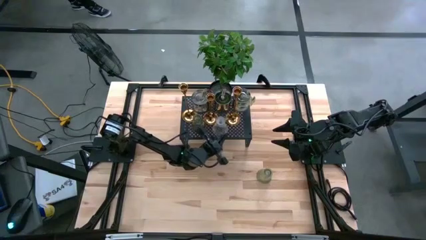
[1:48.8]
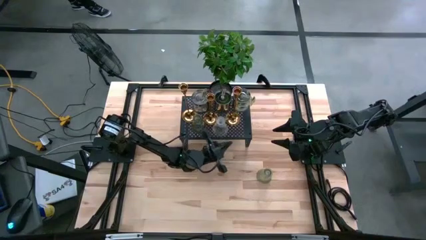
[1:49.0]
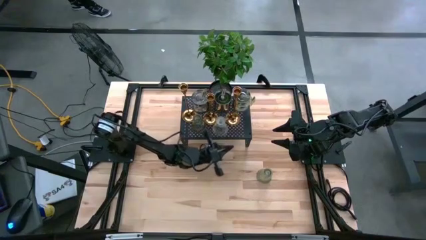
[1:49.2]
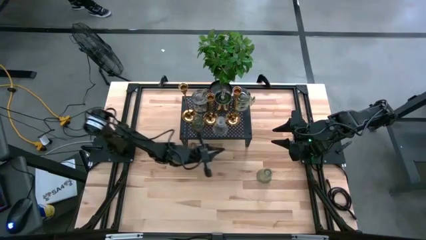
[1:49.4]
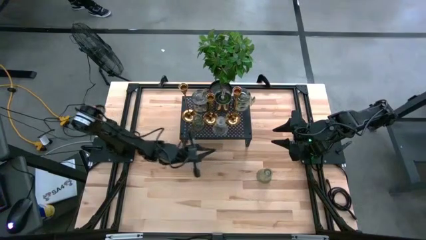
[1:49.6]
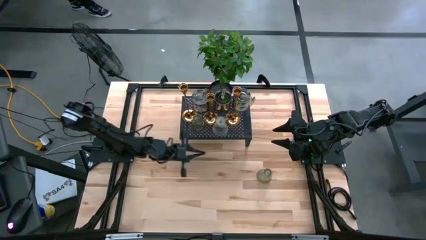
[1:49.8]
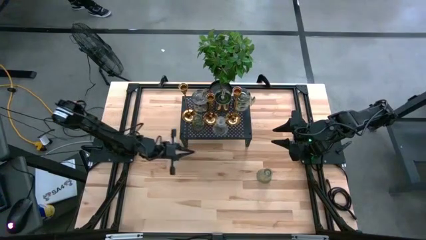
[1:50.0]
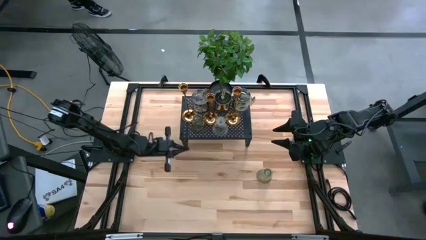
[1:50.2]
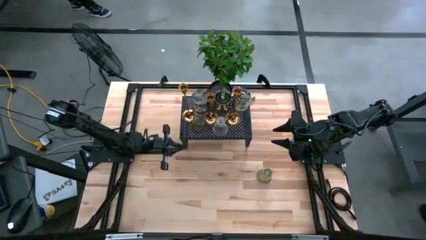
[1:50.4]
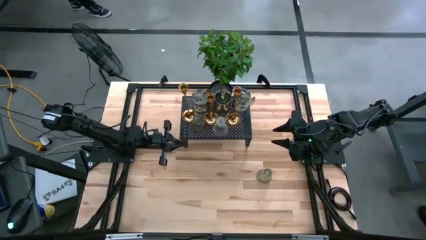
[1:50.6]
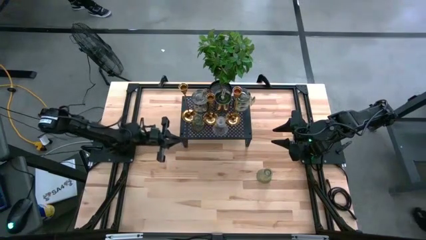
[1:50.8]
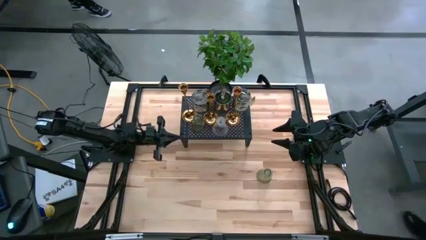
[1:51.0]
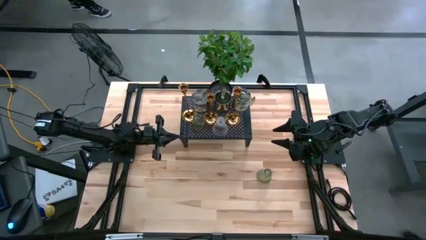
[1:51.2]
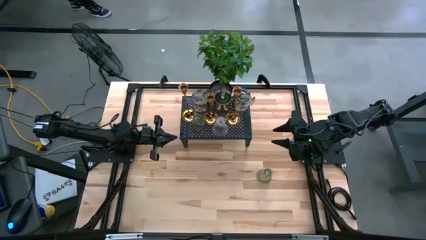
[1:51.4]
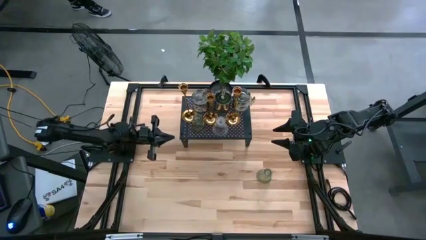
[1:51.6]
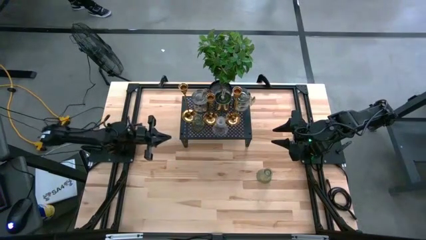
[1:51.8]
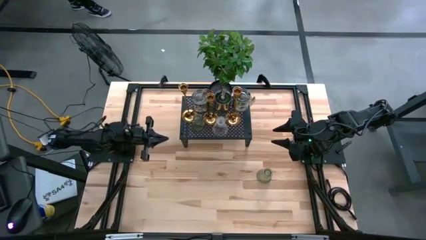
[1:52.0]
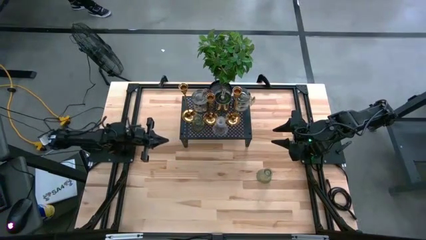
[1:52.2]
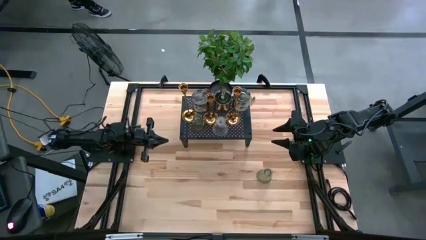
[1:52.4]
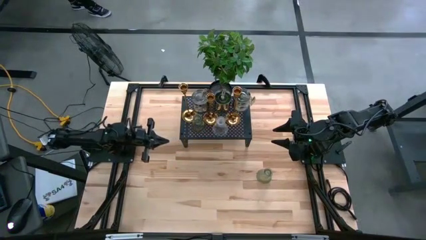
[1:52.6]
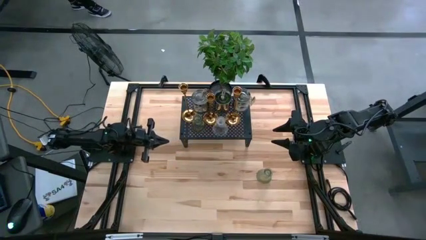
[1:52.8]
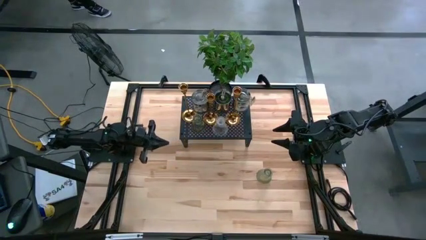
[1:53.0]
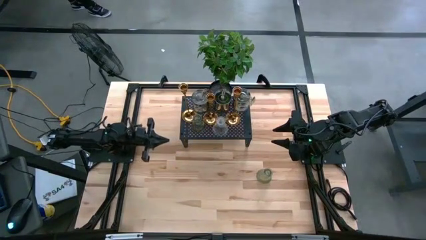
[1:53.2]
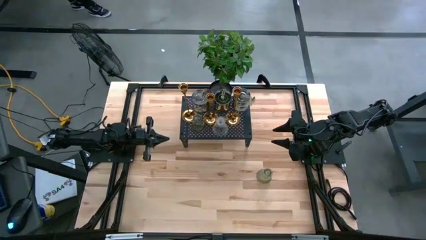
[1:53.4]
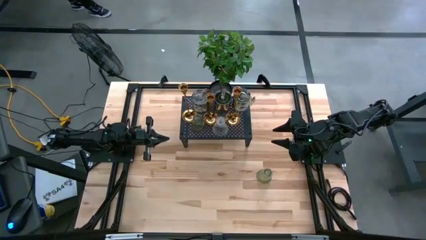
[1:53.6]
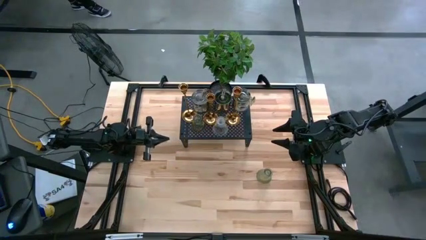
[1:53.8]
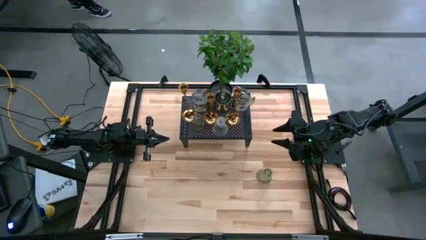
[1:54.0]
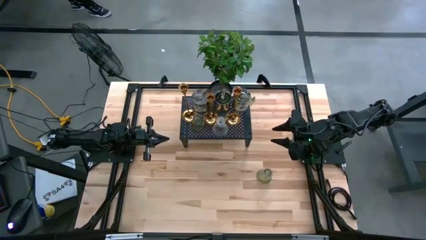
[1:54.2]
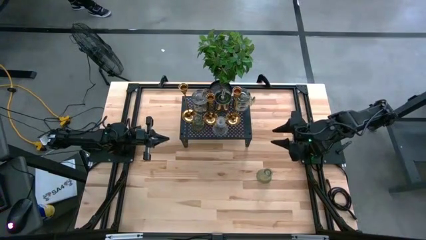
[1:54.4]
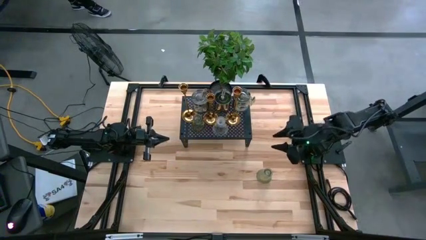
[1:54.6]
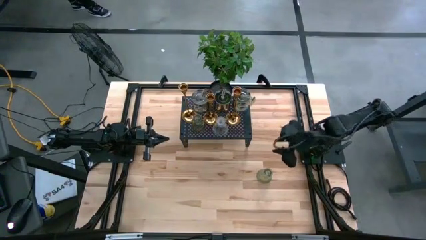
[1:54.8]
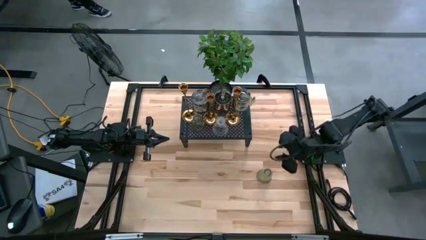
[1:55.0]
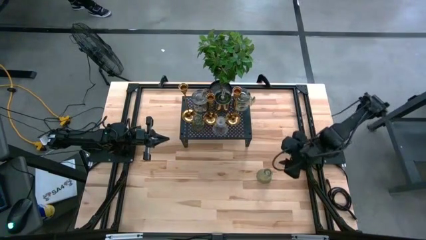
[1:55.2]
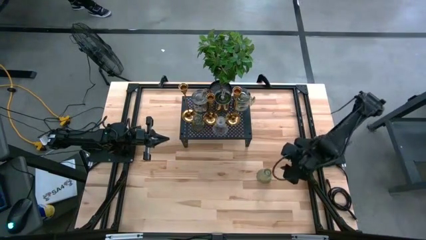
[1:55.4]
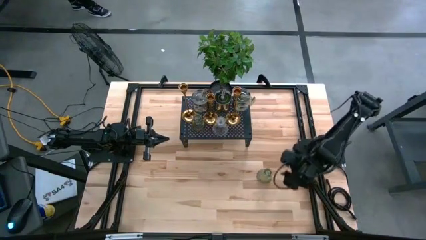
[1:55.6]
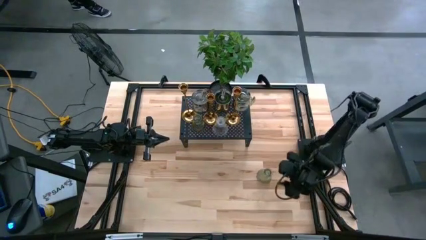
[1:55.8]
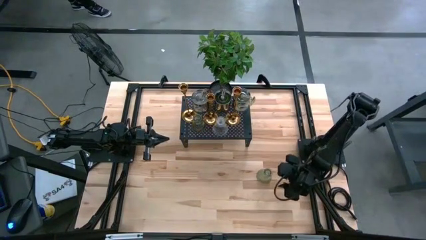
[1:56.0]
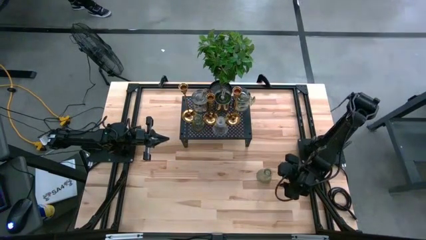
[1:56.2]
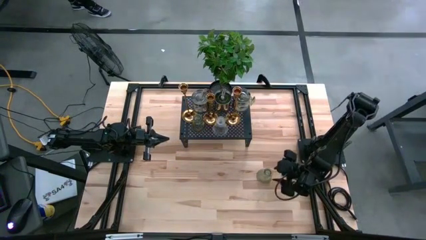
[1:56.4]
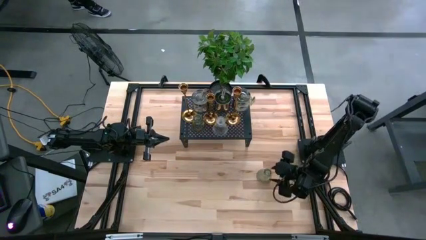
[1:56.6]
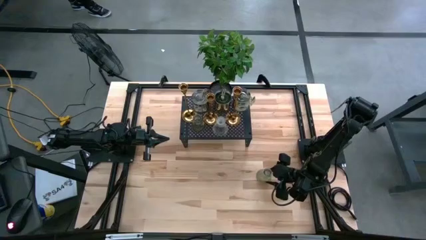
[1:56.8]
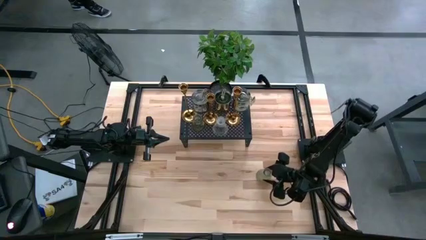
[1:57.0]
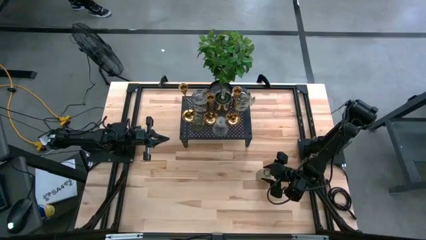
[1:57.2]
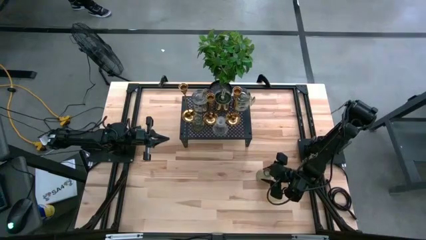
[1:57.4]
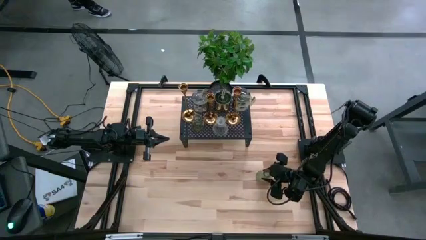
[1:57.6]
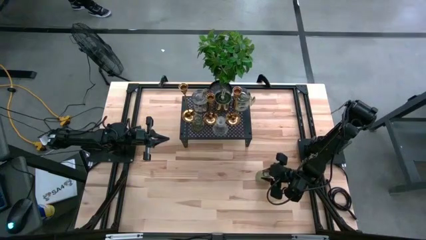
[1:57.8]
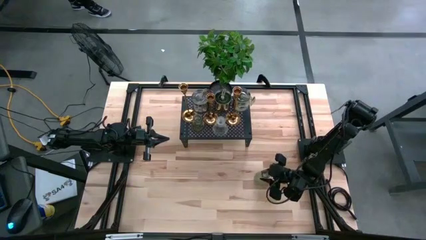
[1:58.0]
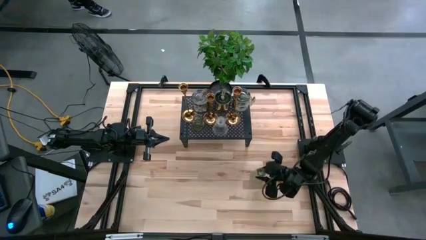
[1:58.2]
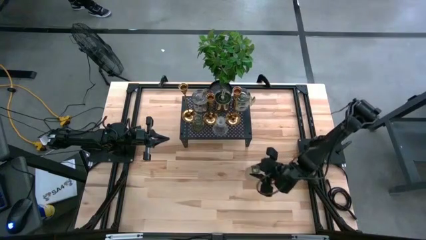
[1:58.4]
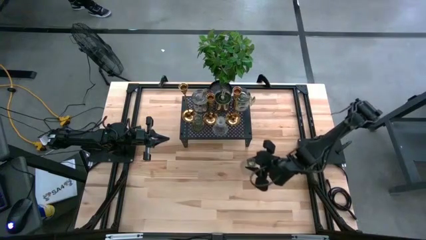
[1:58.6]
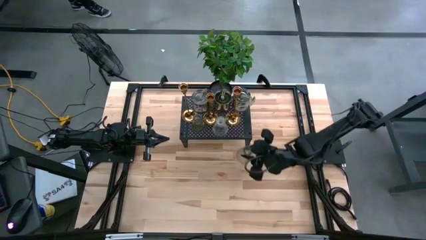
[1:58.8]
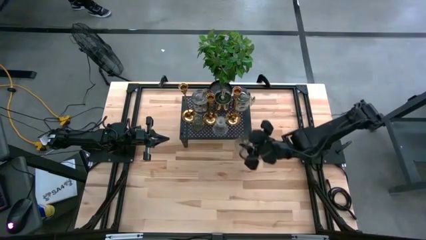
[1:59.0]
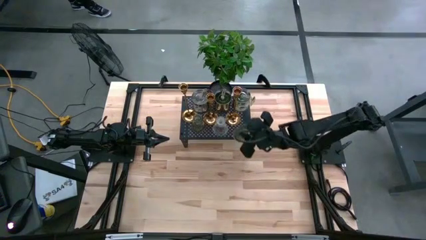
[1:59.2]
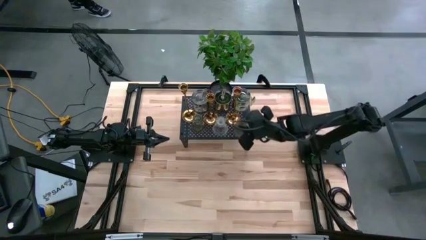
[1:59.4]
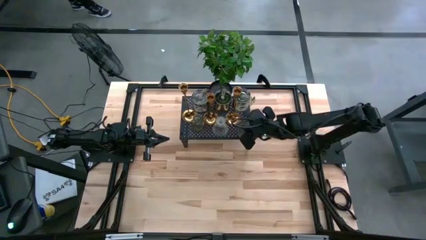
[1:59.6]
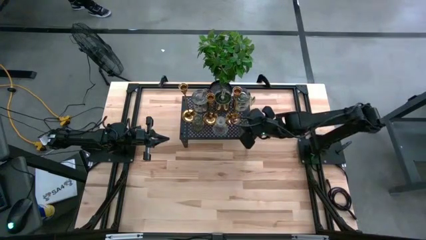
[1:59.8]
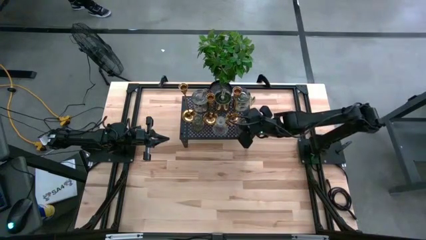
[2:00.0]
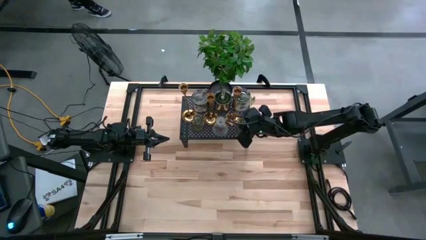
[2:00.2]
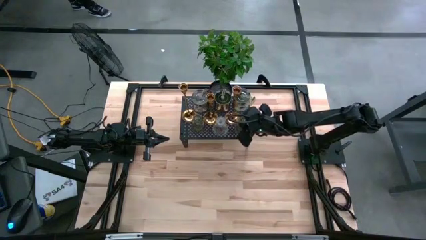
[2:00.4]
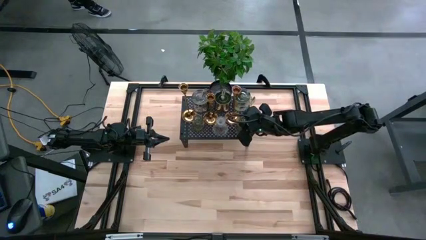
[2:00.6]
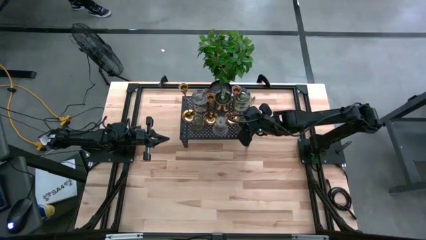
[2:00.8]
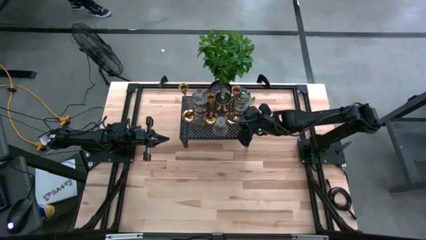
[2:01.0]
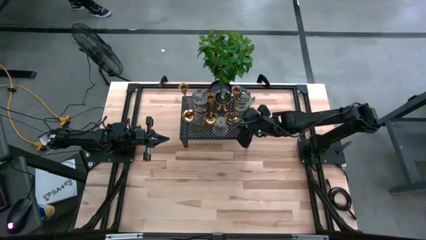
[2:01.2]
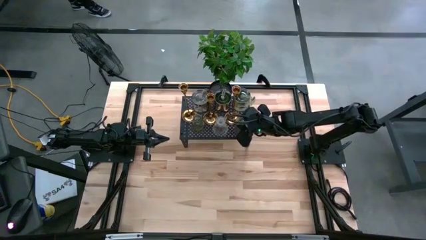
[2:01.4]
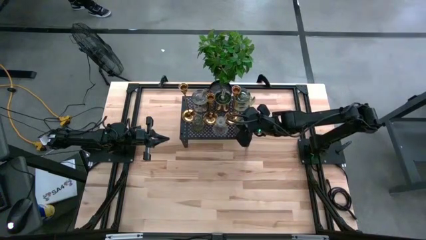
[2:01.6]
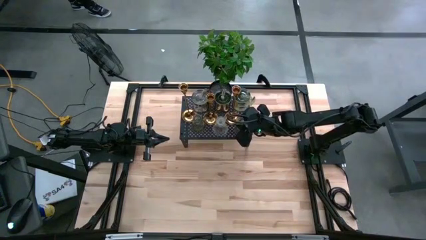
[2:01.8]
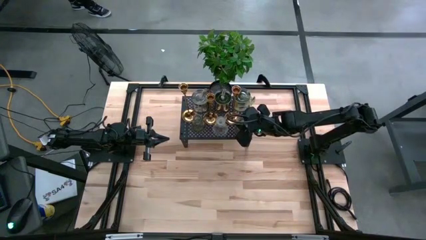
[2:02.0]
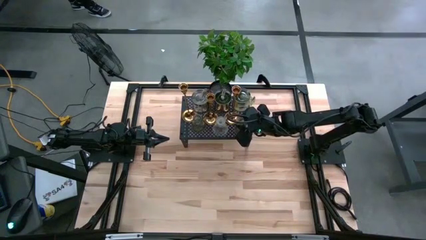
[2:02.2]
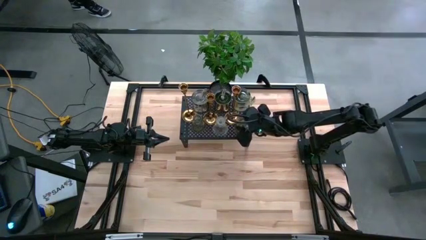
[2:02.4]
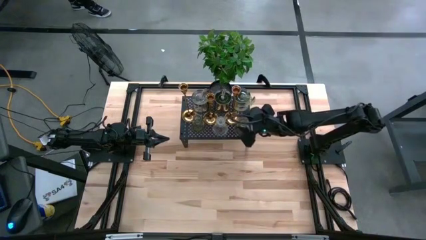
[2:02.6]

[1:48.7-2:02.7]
Task: Pick & Place candle stick holders
Put the green candle holder on the shelf aligned with the other green and transparent candle holders

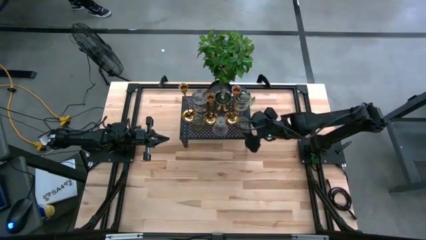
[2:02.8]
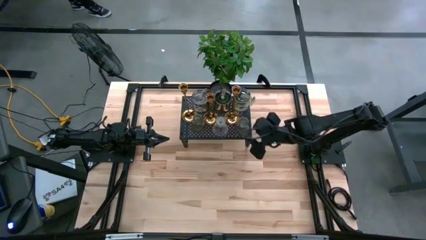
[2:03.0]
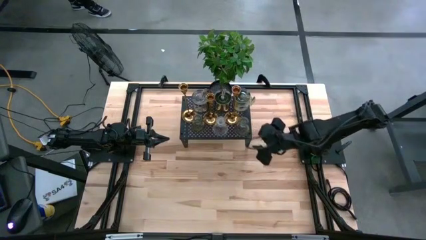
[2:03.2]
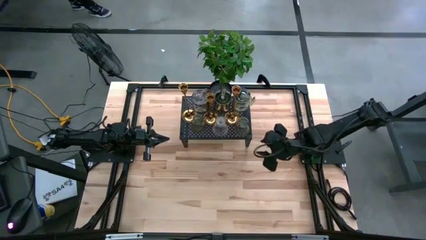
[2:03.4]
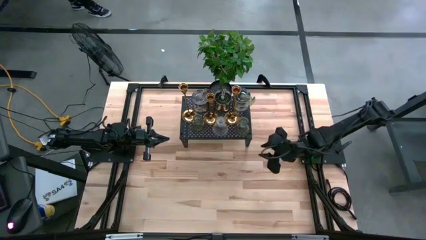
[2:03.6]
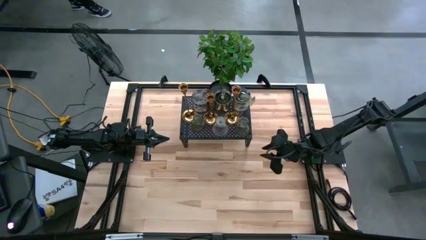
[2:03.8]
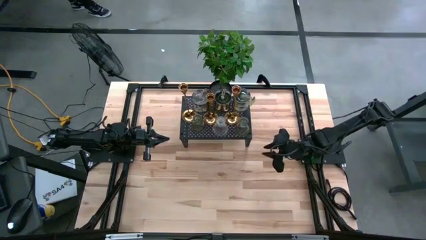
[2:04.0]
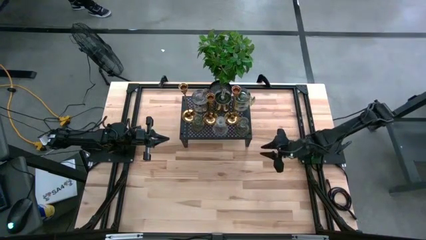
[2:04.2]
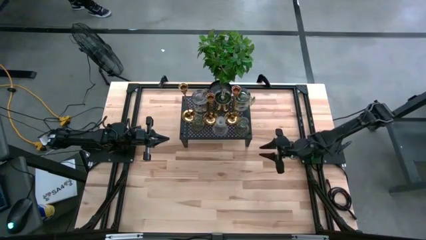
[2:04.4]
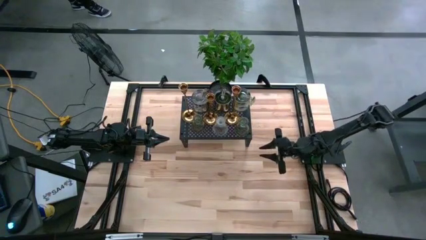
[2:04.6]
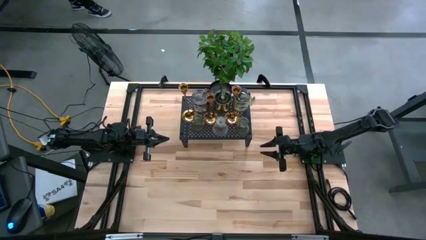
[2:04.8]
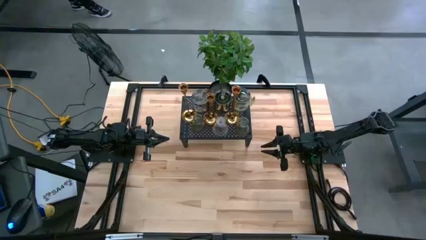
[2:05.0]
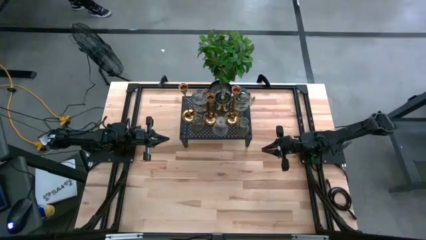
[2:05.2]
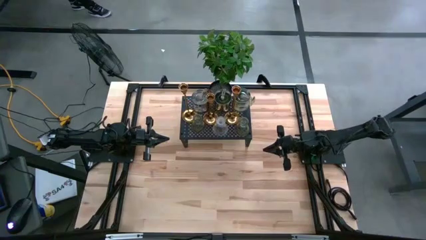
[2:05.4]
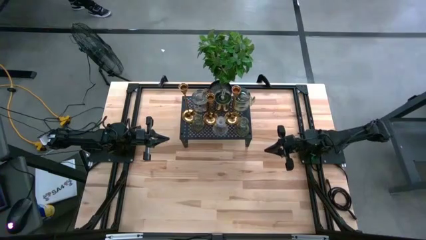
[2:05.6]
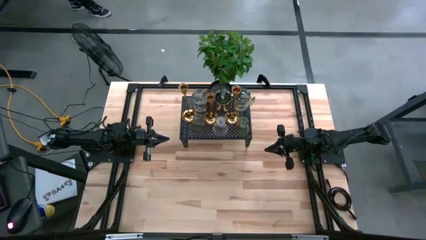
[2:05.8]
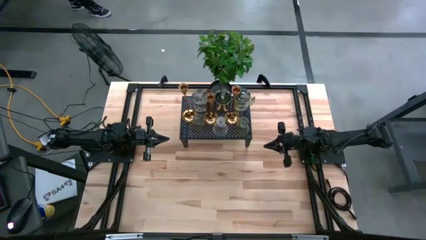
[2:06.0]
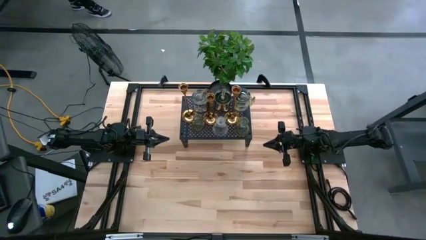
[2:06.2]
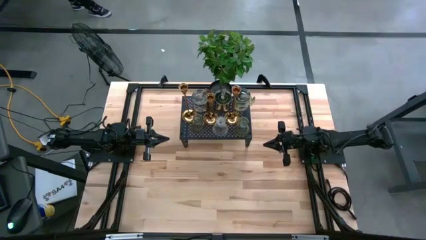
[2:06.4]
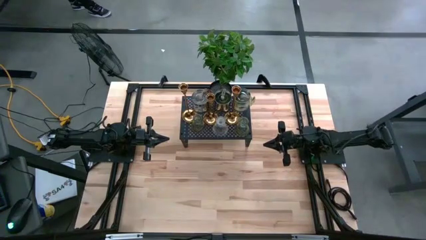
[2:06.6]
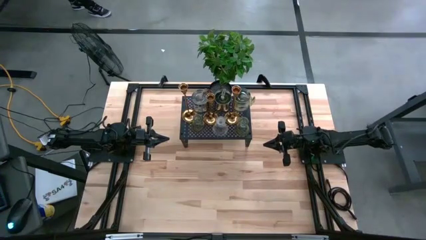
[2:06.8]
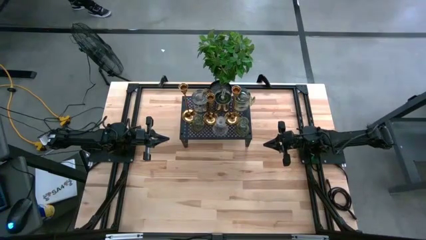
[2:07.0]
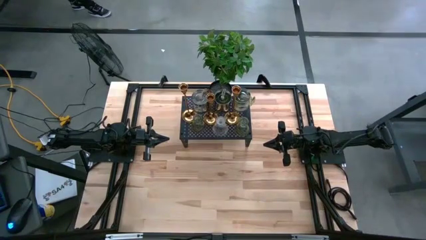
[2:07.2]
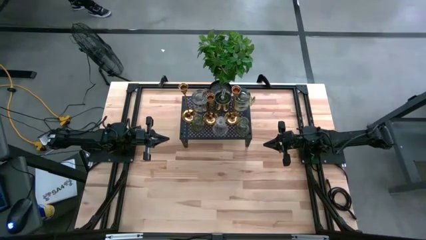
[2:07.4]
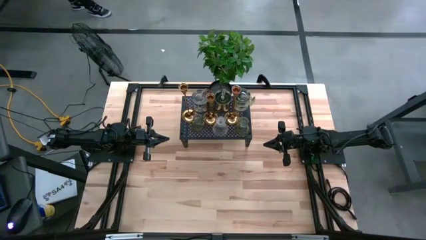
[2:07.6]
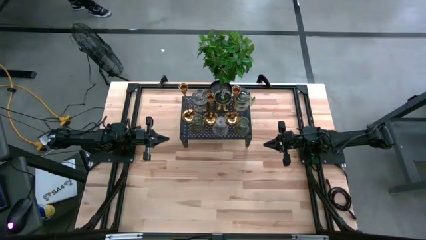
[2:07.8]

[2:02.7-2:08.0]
Return to Home Position
